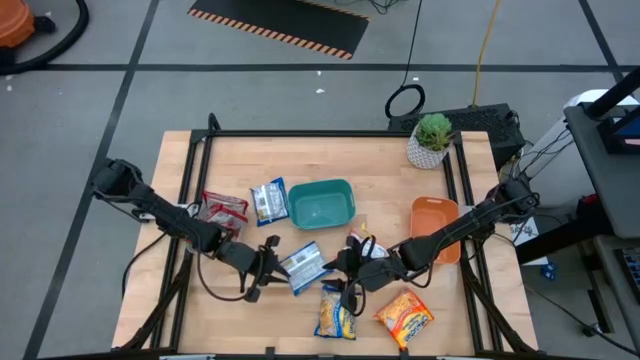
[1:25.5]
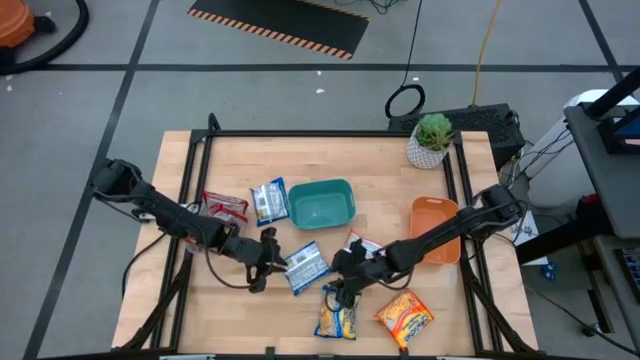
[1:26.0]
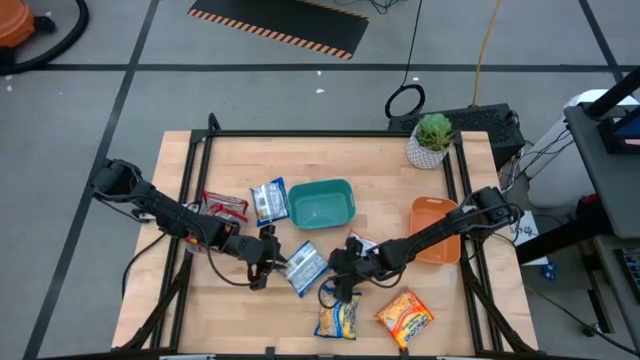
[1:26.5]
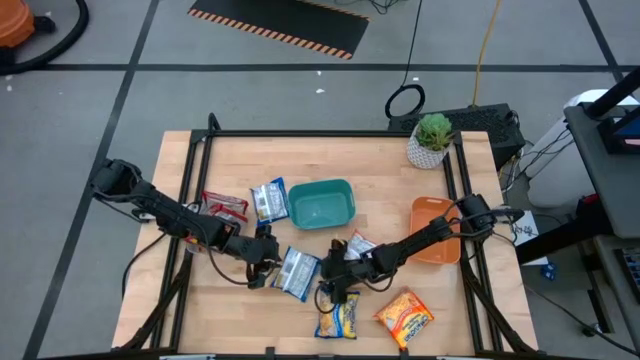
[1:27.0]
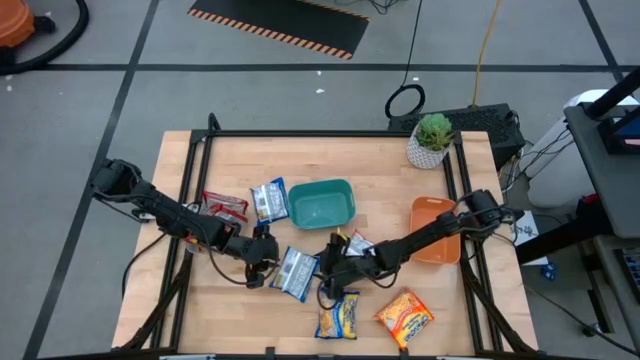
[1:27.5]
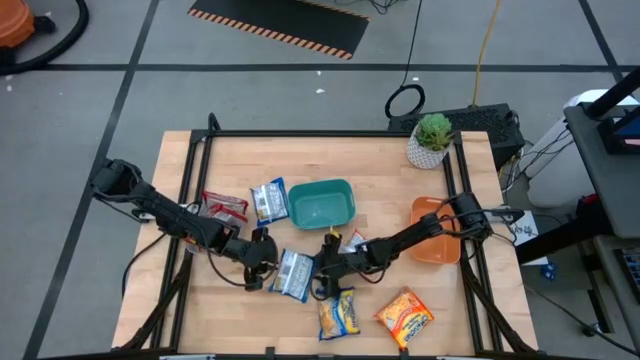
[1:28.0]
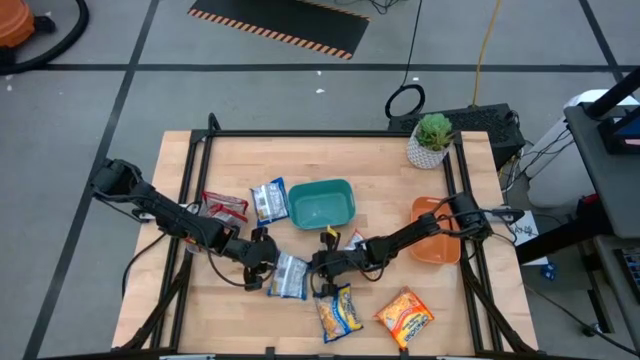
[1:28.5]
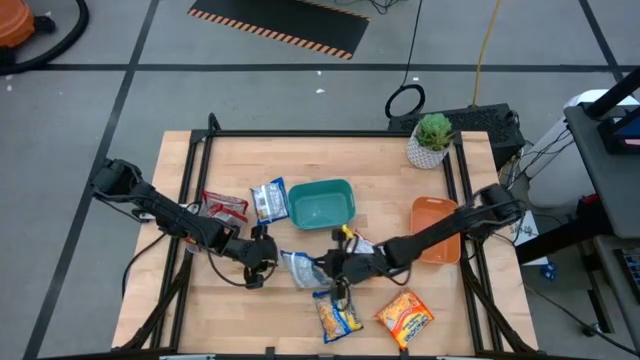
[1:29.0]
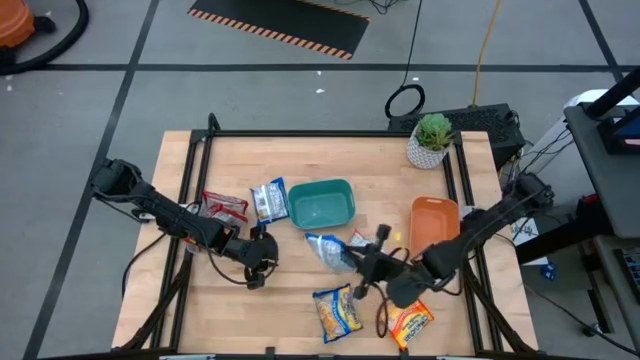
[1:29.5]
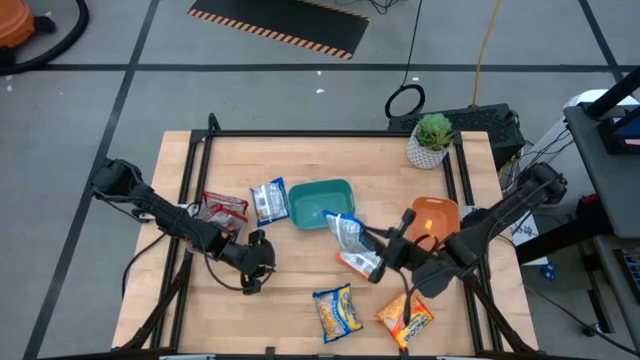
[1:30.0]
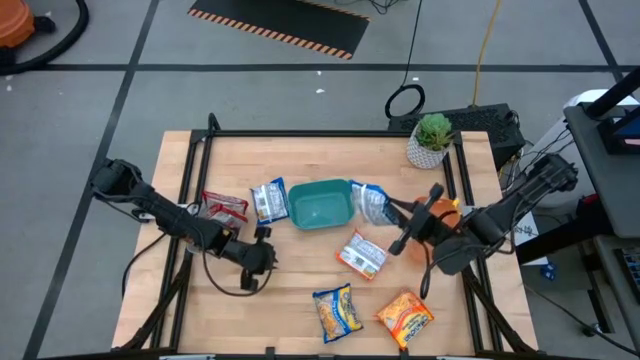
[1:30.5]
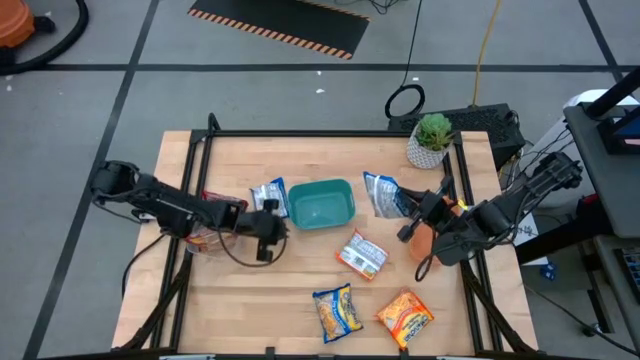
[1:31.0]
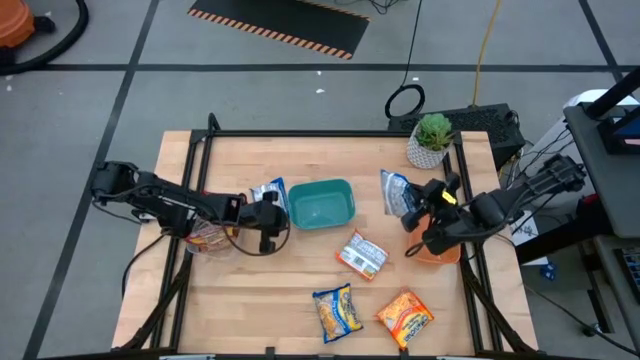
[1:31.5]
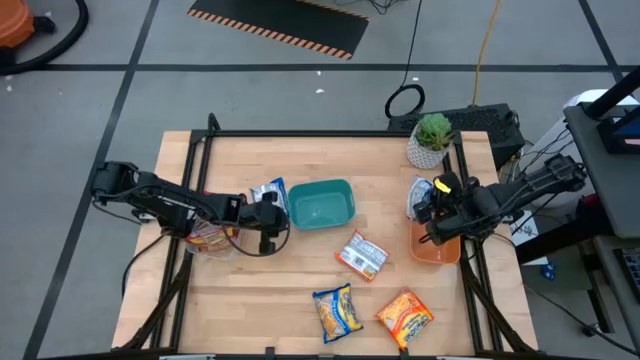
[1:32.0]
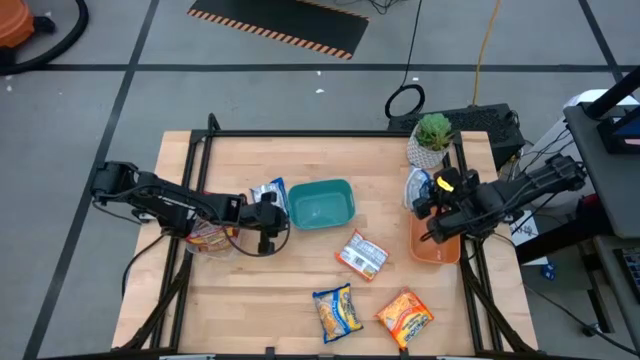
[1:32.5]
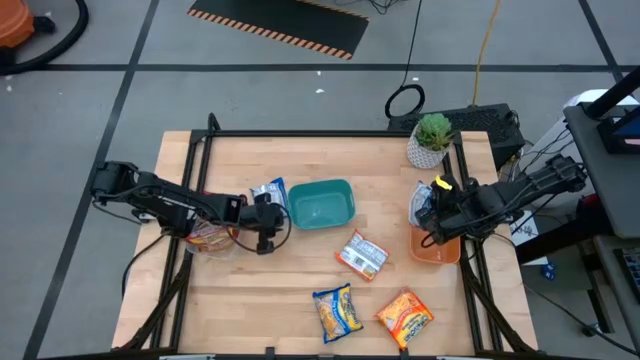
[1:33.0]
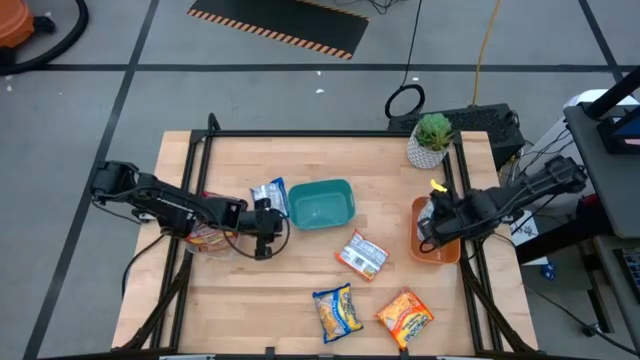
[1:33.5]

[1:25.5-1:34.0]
Task: Sort Maruchan noodles
Put the middle blue noodle pack into the orange bin
